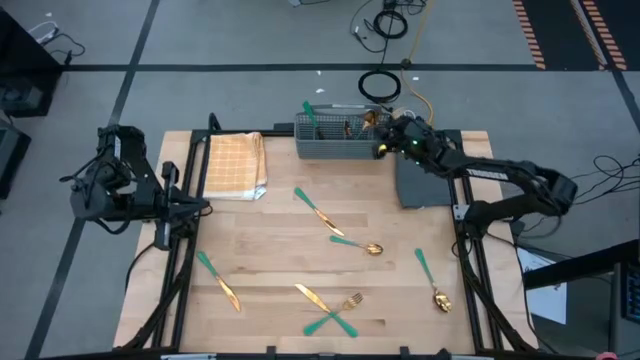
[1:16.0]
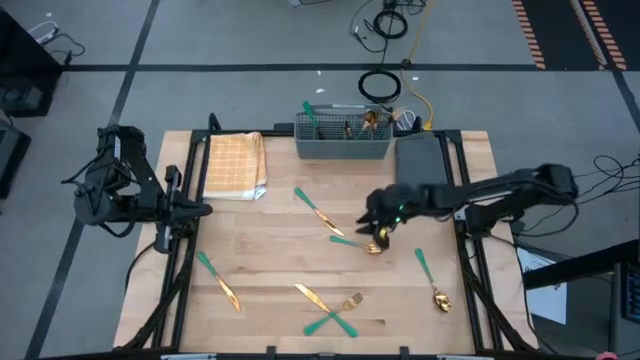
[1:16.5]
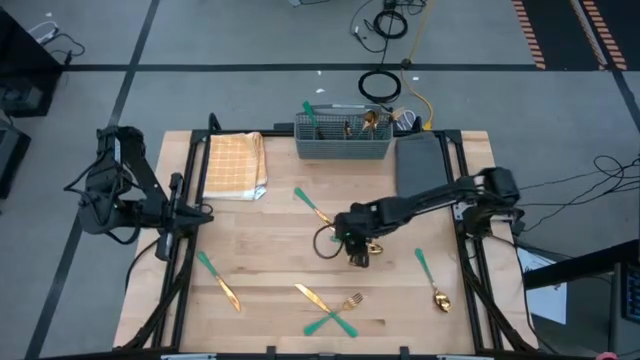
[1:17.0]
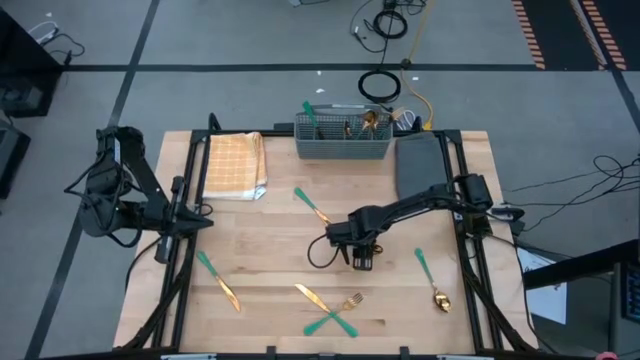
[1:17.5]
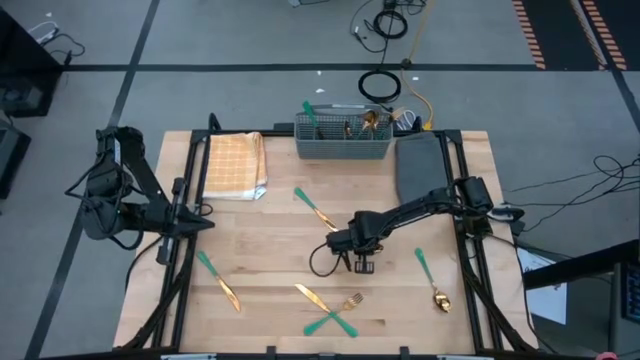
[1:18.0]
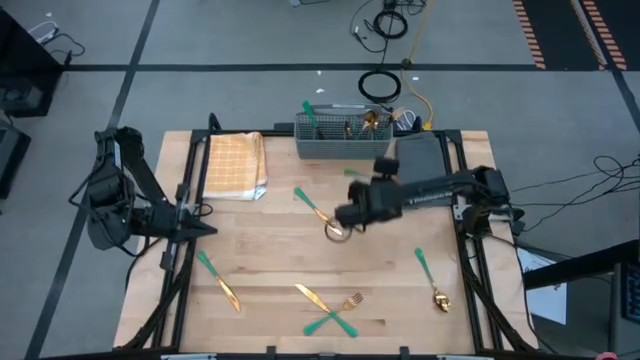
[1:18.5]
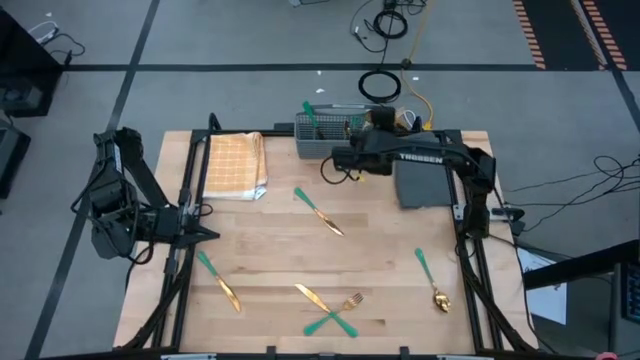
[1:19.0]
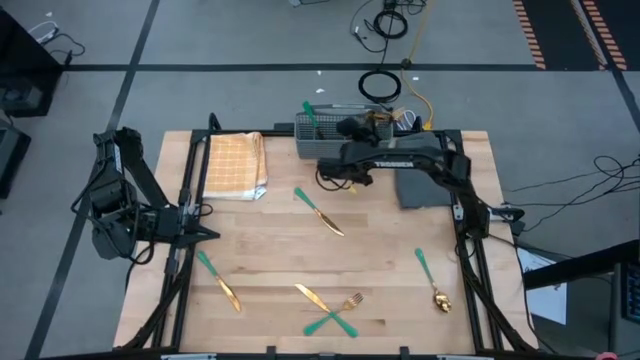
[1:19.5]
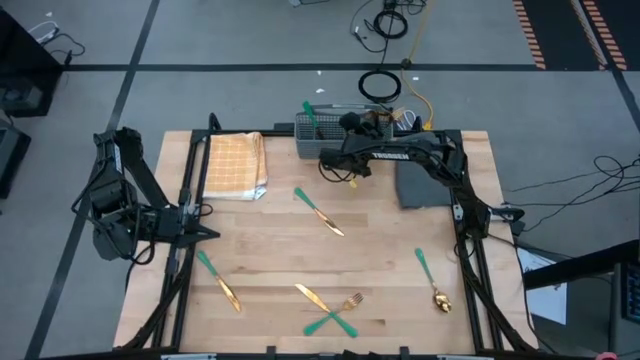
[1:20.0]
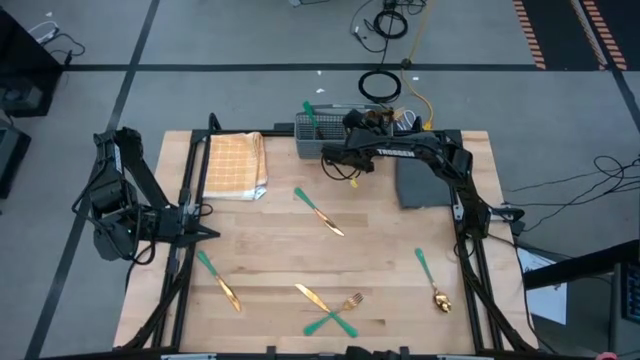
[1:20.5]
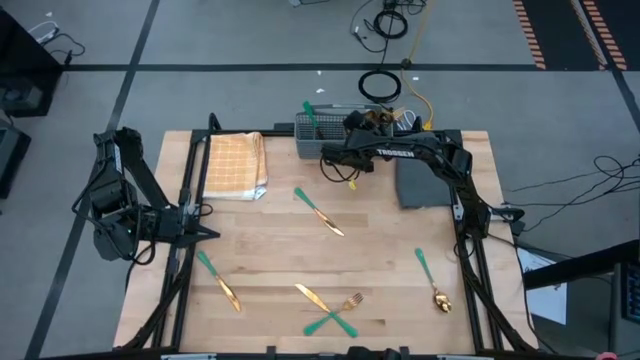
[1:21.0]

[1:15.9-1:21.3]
Task: Sort silverware
Put the spoon into the middle right section of the dish rack

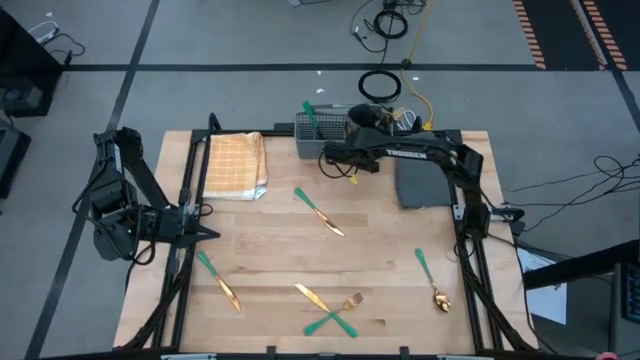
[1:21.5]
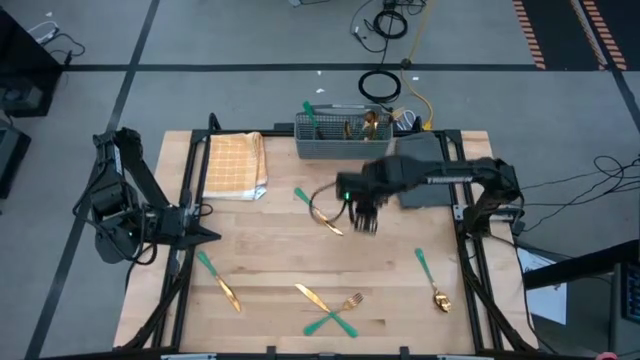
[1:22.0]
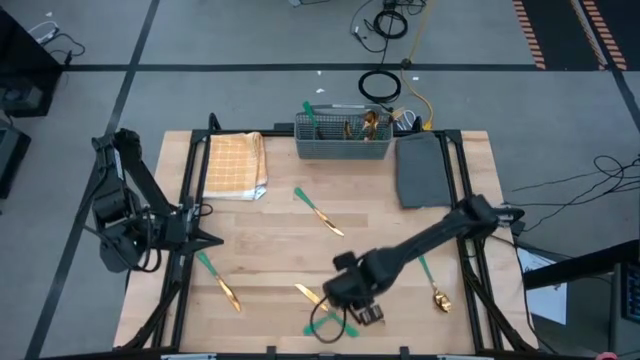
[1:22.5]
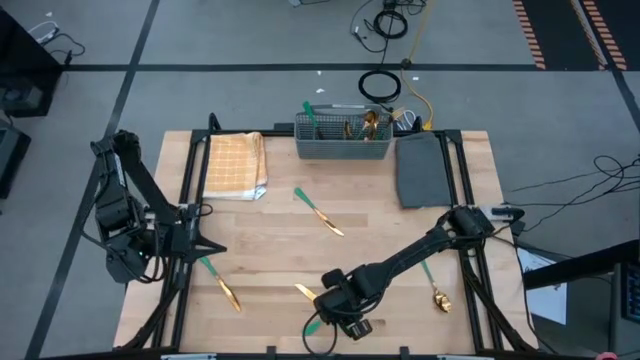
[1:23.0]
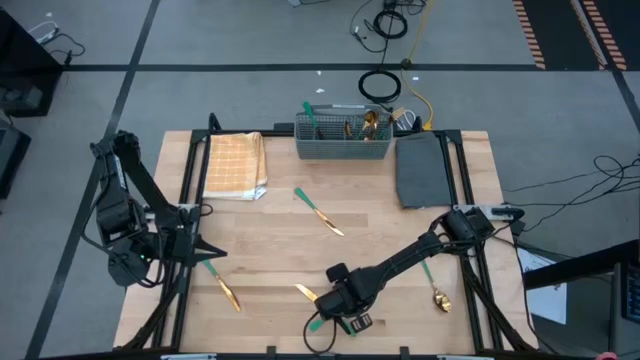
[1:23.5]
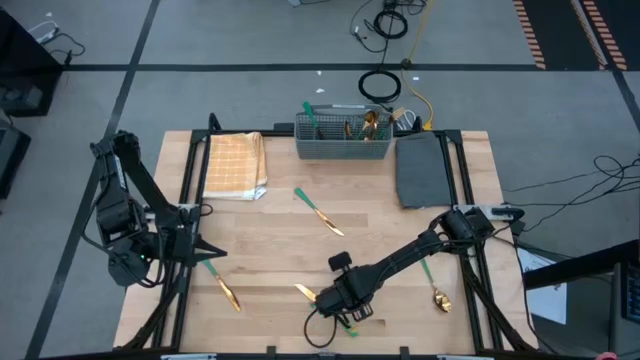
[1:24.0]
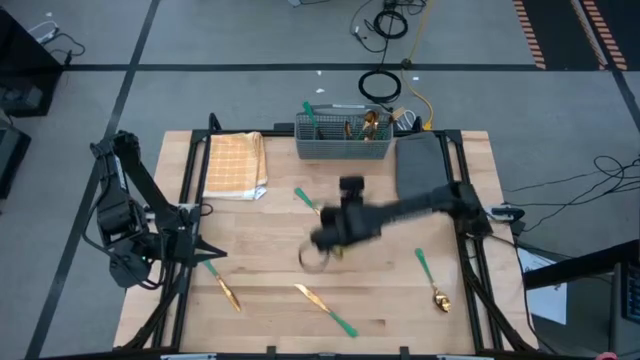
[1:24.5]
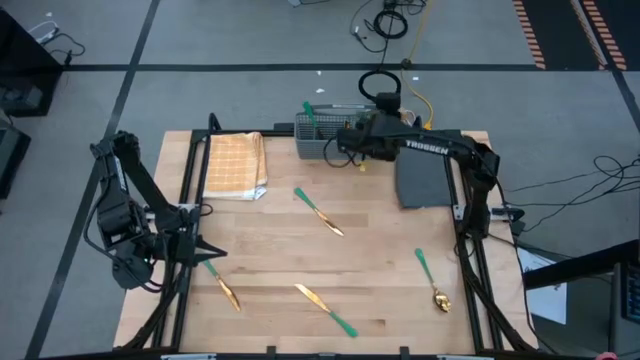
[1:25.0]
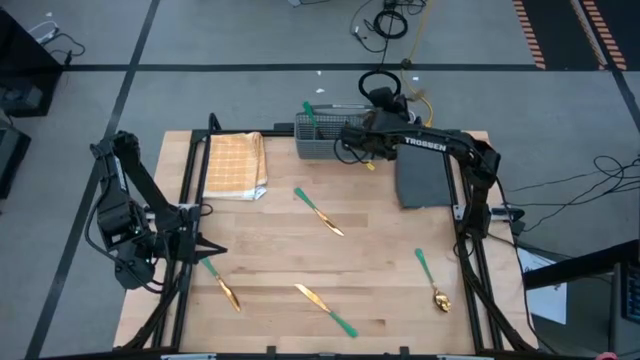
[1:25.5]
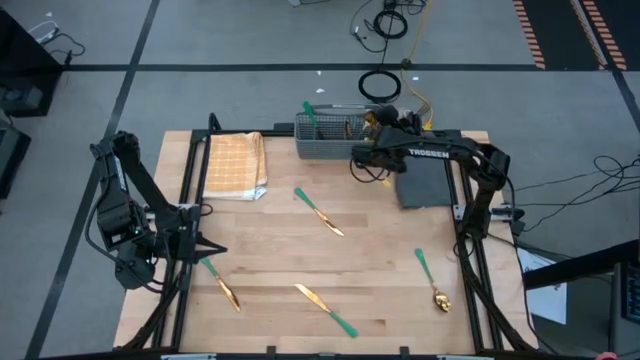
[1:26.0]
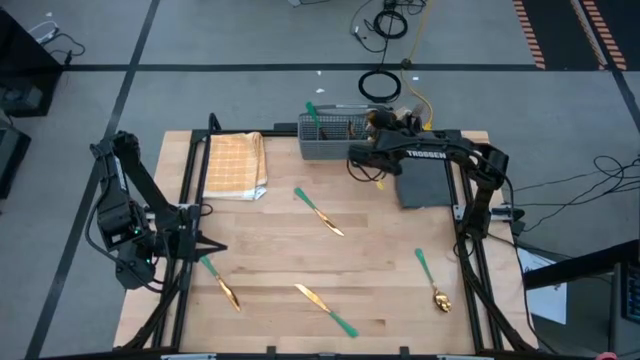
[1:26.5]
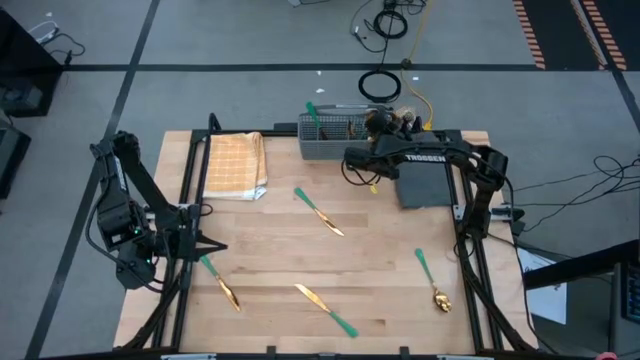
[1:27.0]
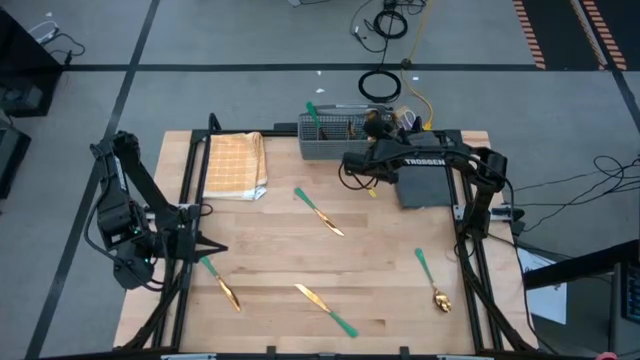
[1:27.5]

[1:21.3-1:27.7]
Put the fork into the right section of the dish rack

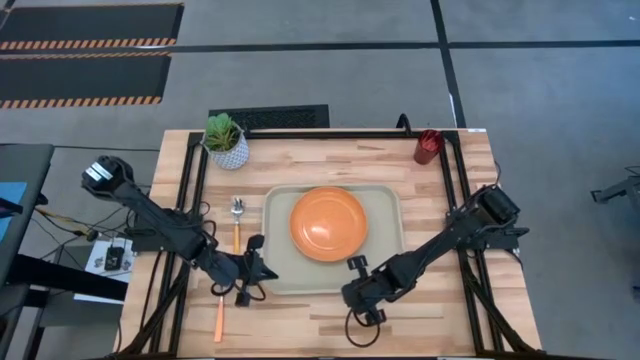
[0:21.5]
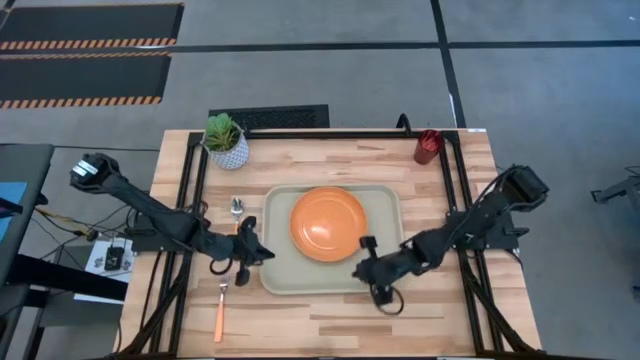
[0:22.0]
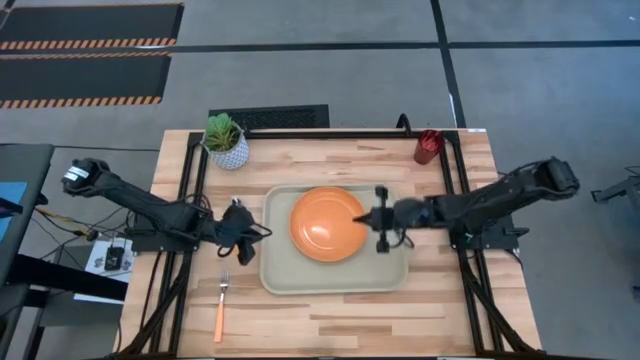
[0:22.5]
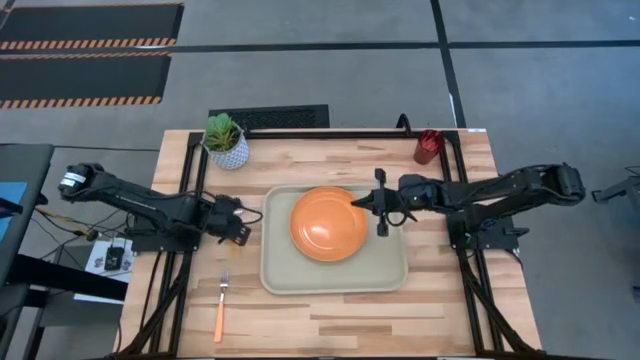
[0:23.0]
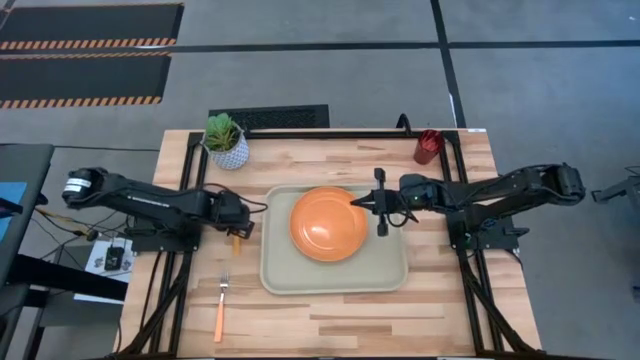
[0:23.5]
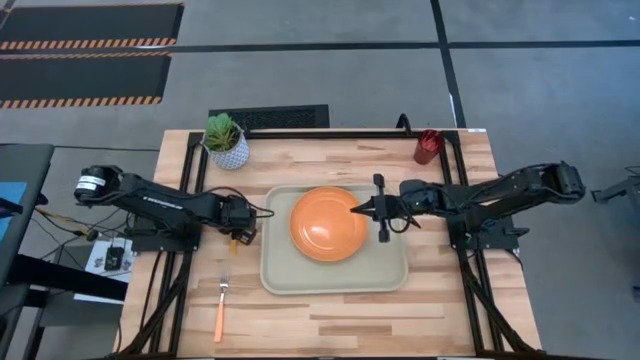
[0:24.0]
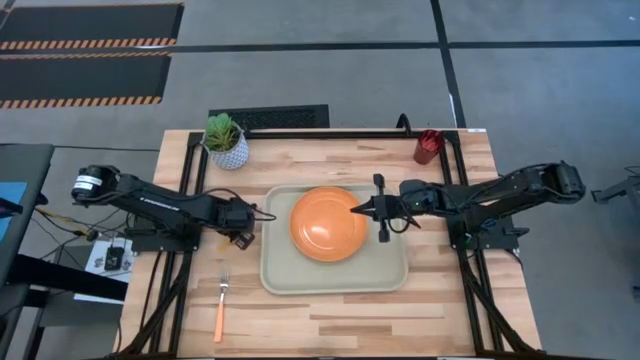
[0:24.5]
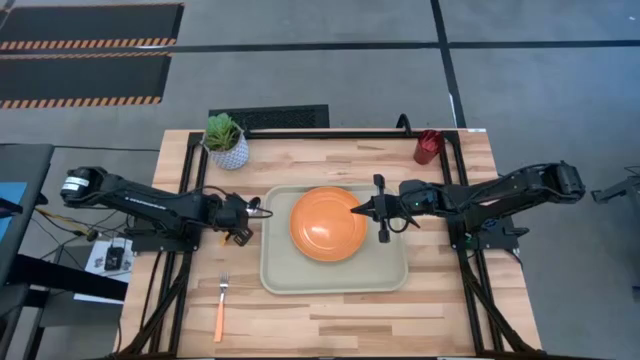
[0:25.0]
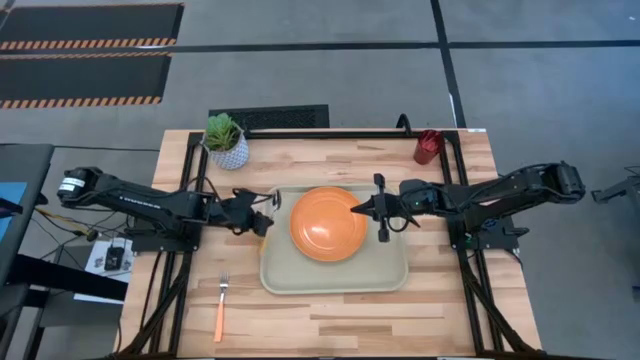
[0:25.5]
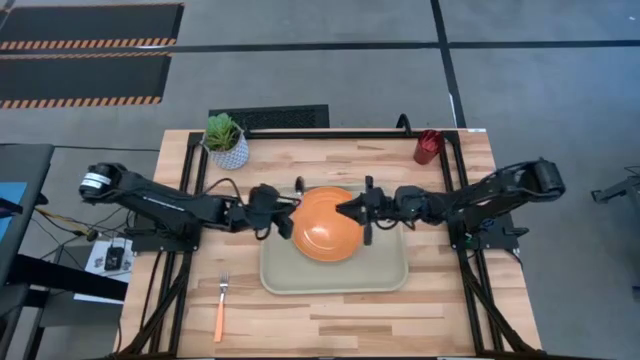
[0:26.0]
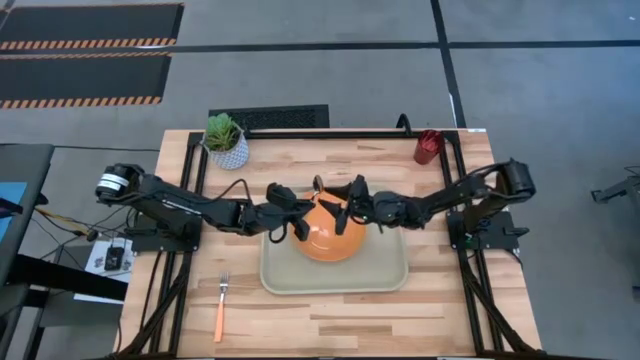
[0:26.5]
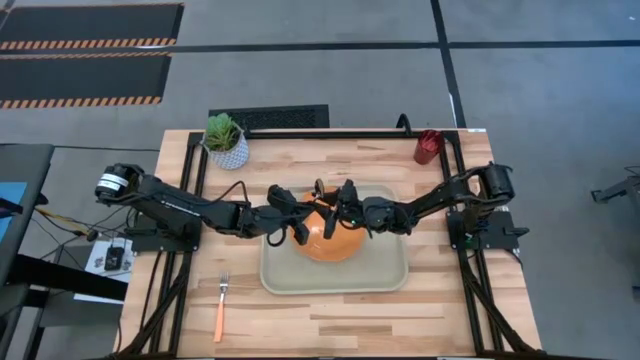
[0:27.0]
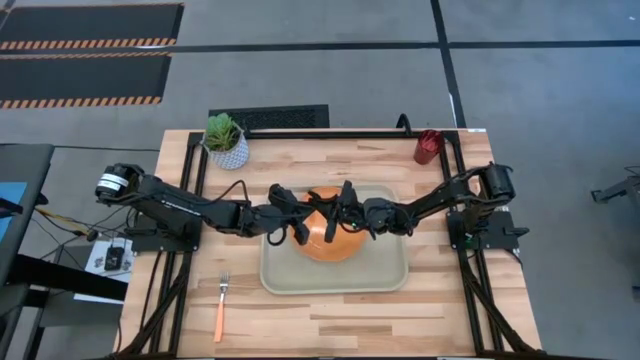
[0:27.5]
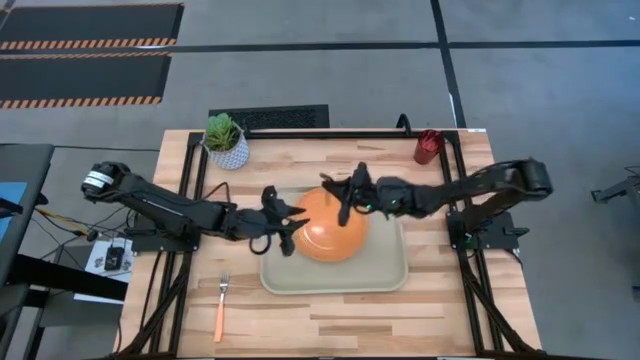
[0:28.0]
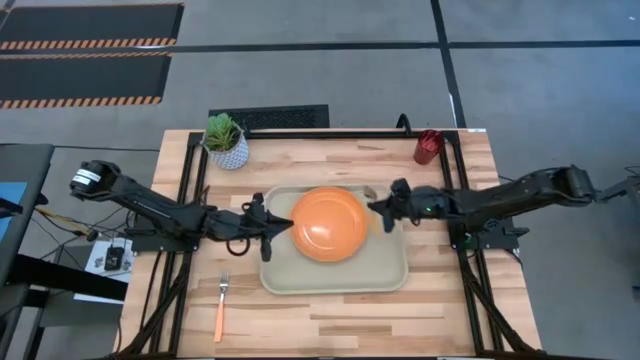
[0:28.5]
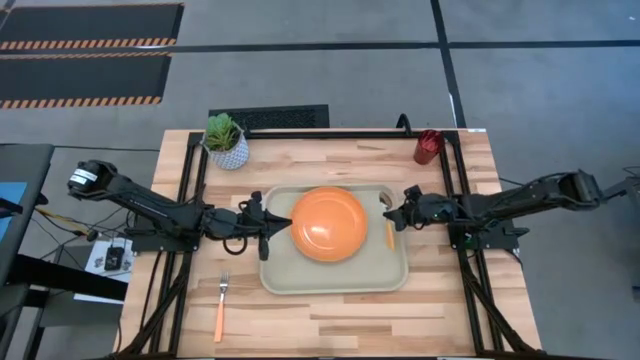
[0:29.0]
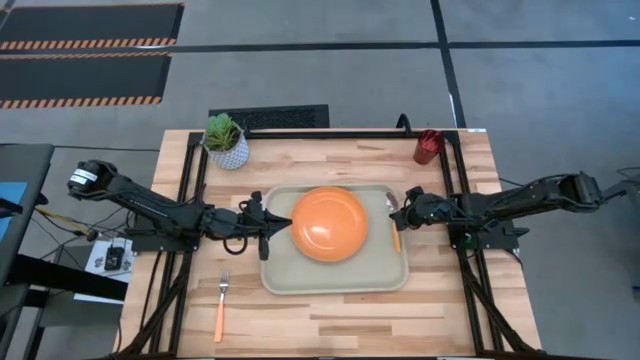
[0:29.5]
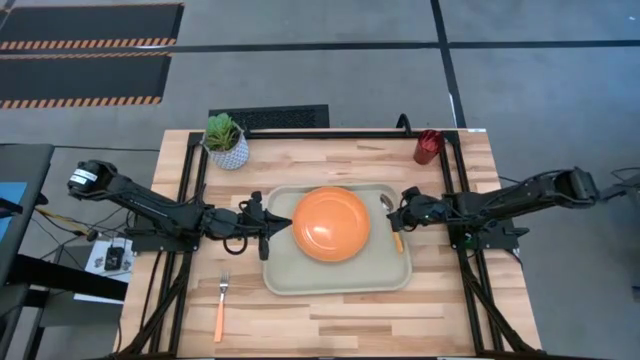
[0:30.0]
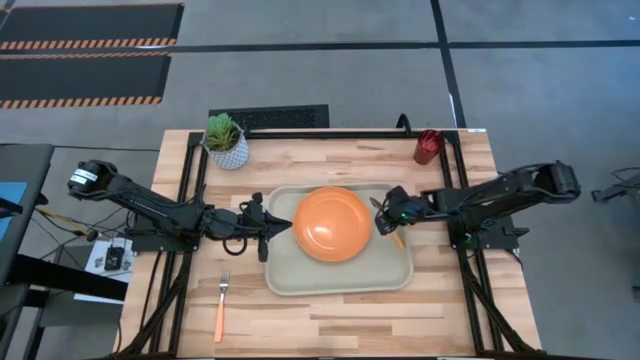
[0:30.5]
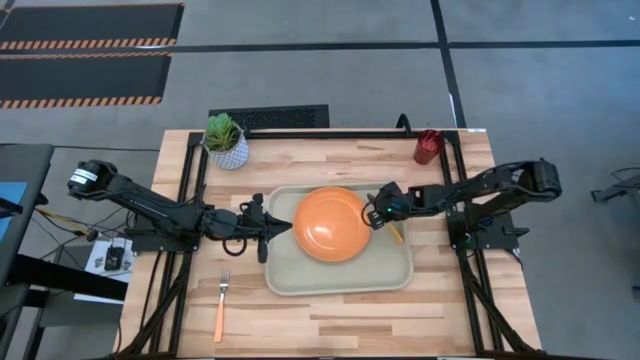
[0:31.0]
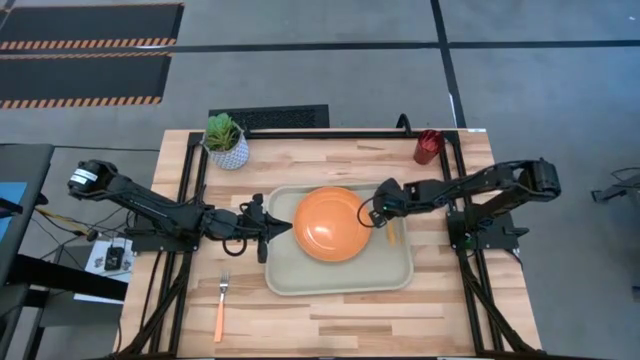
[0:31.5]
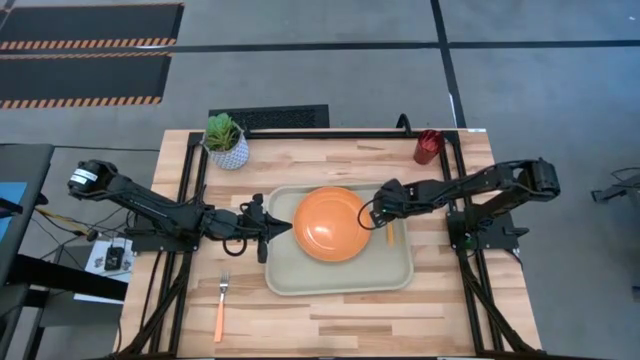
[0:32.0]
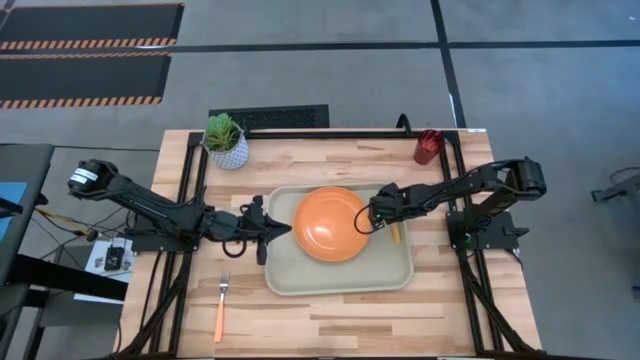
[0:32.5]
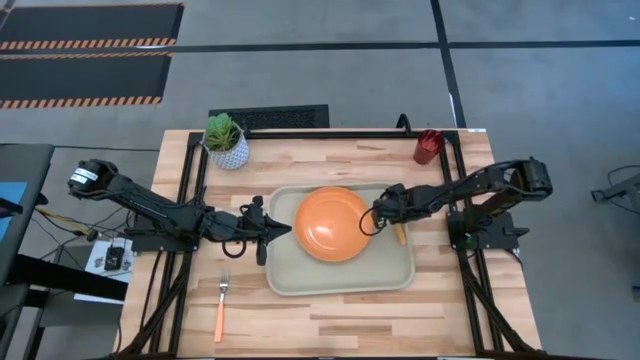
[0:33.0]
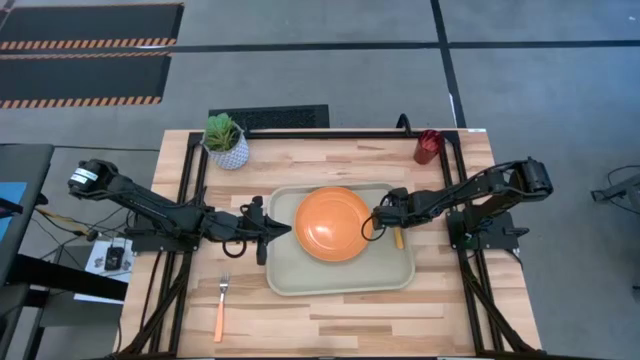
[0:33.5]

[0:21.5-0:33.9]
Task: Pick and place plate/cup/fork/spoon on tray
Put the yellow spoon on the gray serving tray to the right of the orange plate
